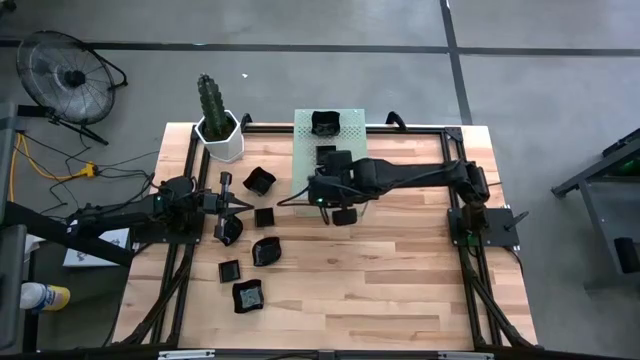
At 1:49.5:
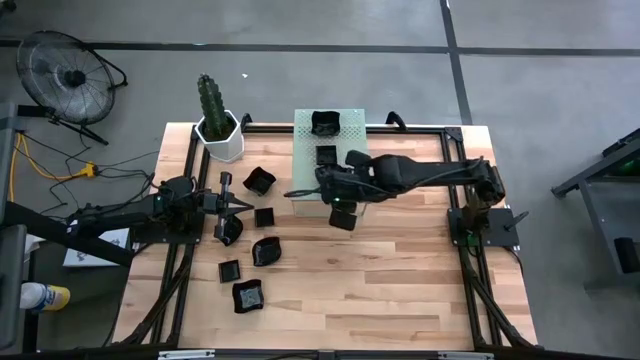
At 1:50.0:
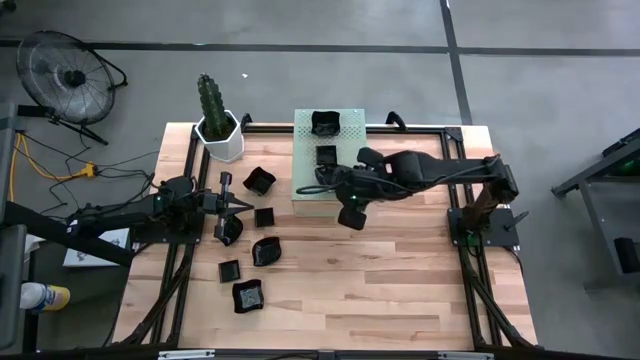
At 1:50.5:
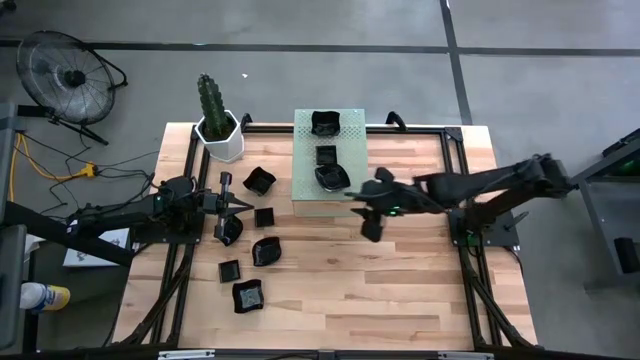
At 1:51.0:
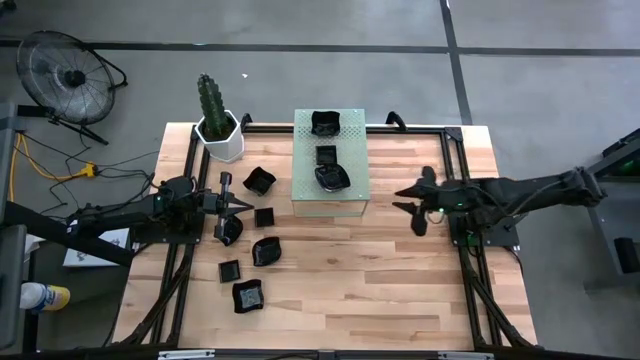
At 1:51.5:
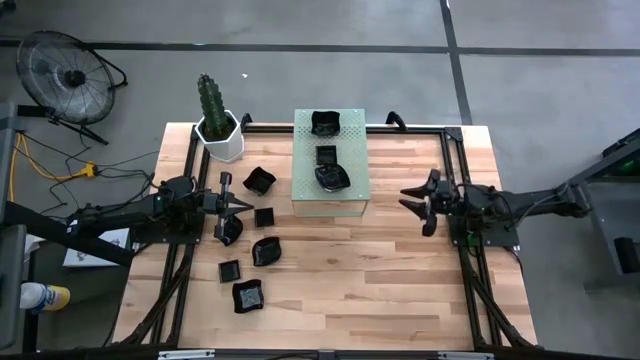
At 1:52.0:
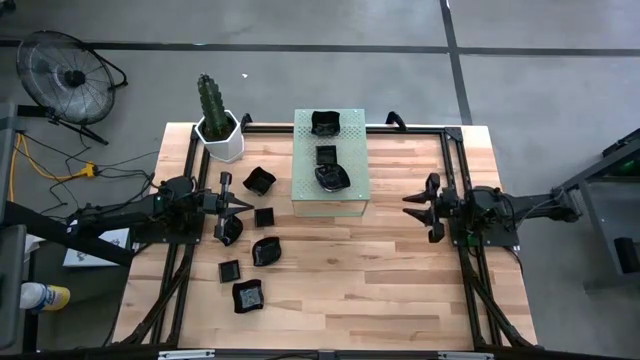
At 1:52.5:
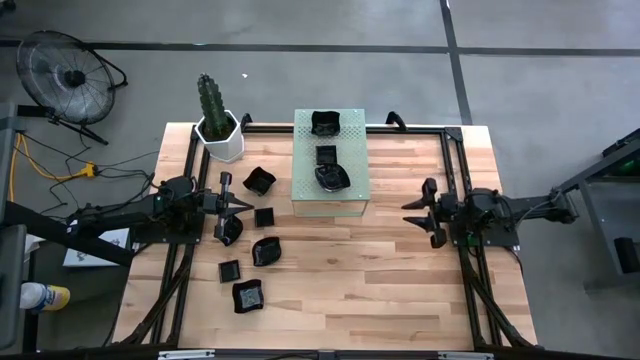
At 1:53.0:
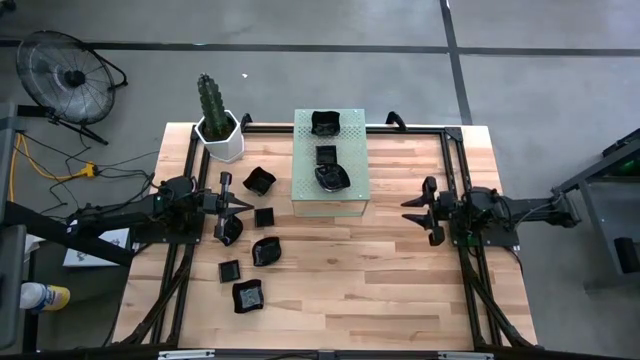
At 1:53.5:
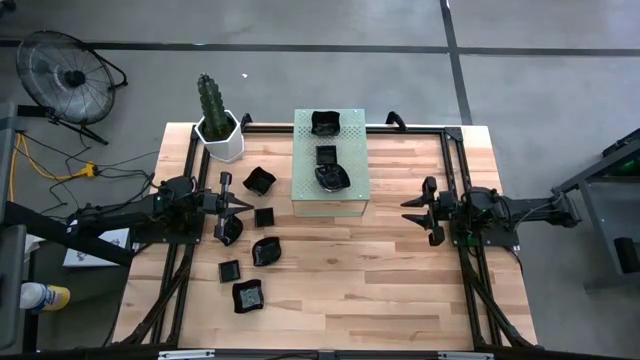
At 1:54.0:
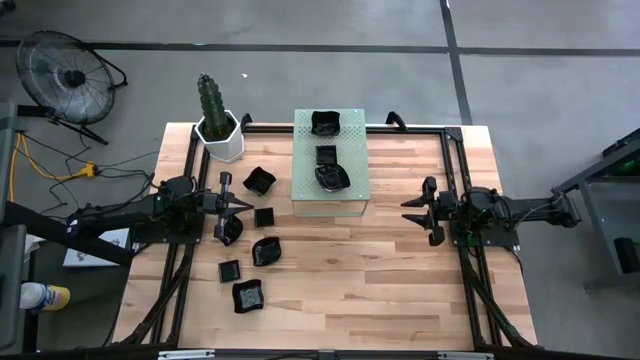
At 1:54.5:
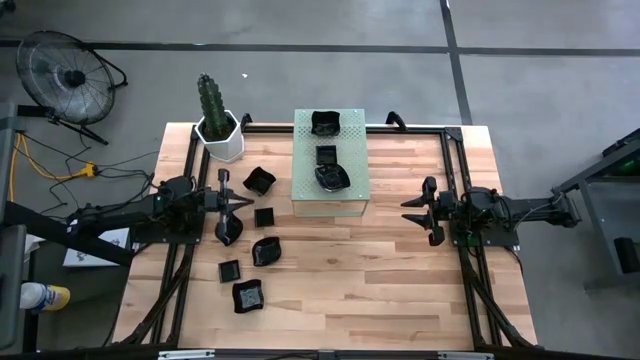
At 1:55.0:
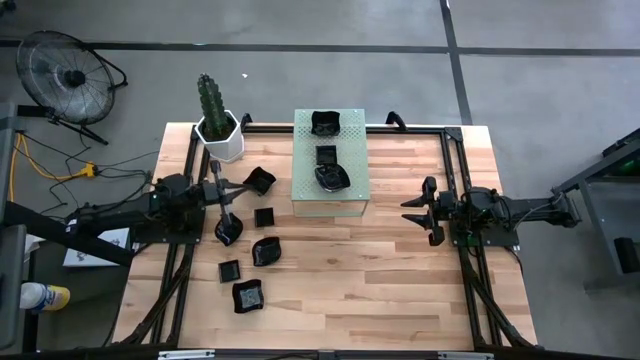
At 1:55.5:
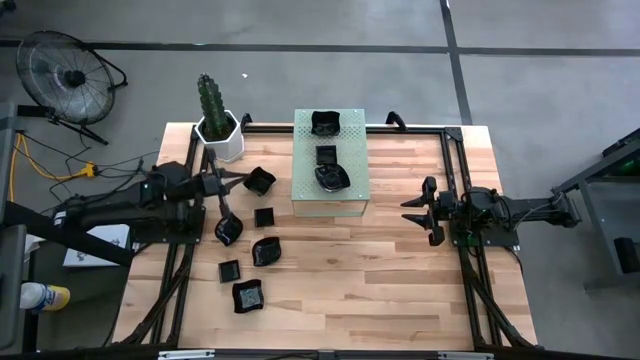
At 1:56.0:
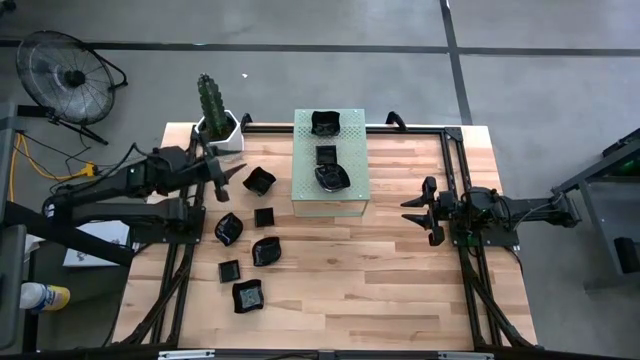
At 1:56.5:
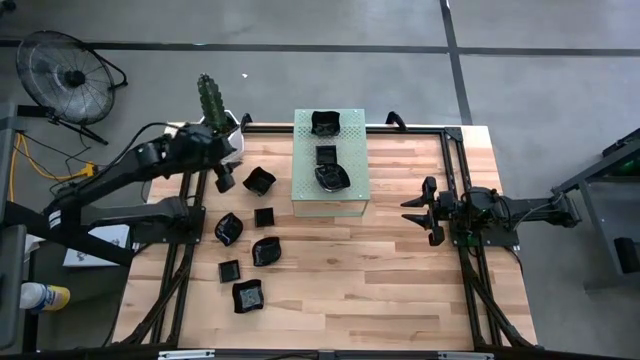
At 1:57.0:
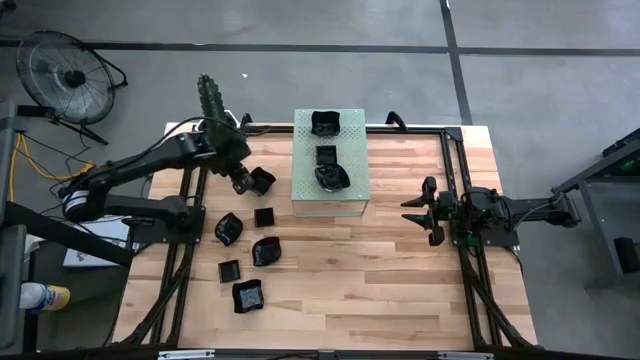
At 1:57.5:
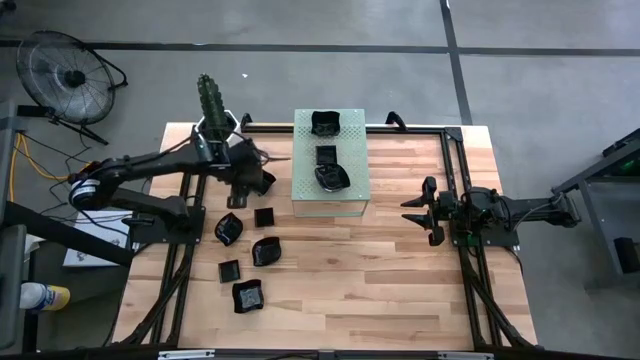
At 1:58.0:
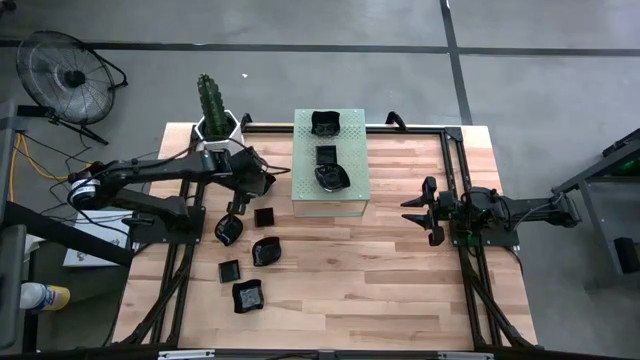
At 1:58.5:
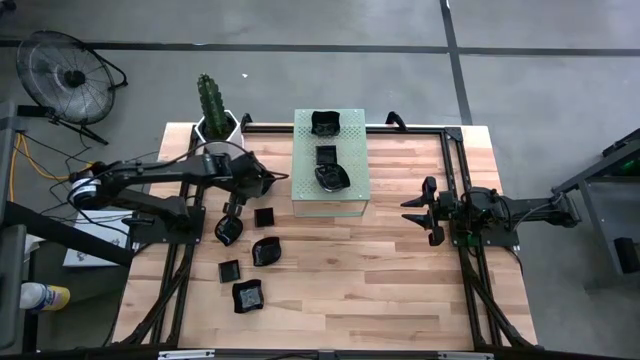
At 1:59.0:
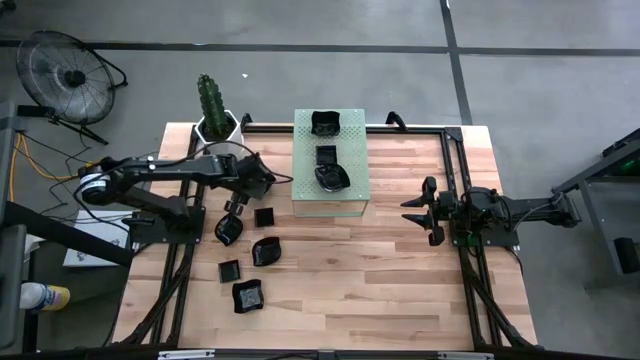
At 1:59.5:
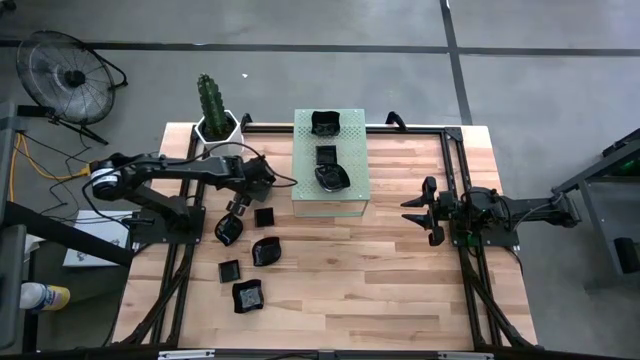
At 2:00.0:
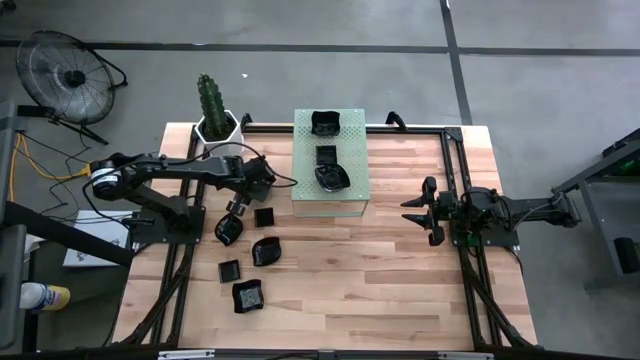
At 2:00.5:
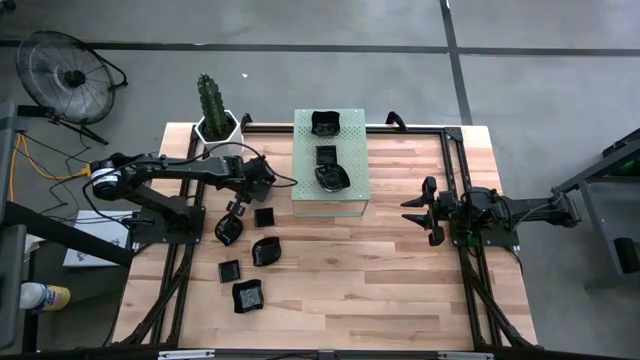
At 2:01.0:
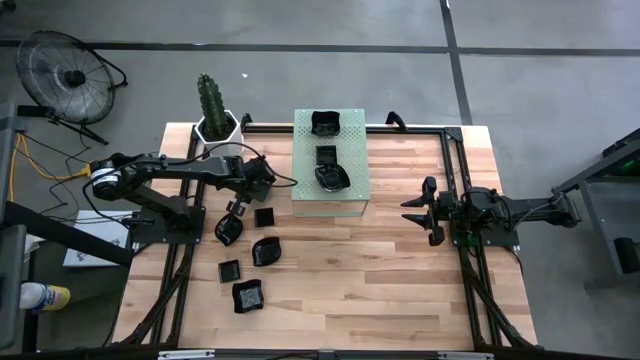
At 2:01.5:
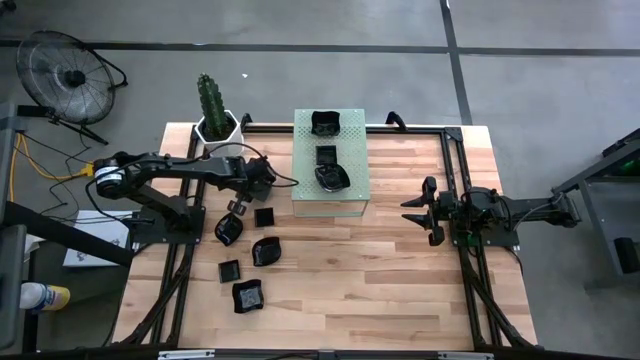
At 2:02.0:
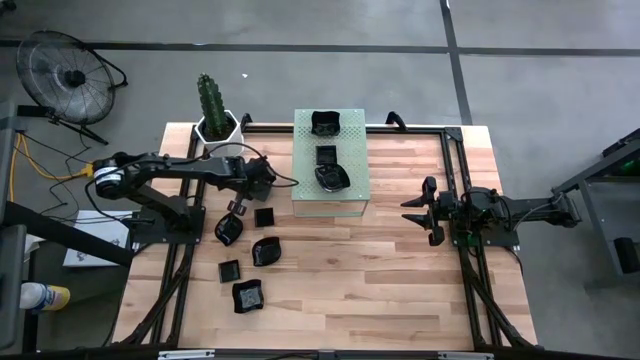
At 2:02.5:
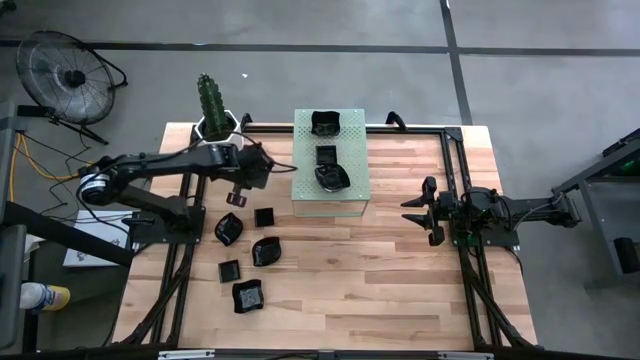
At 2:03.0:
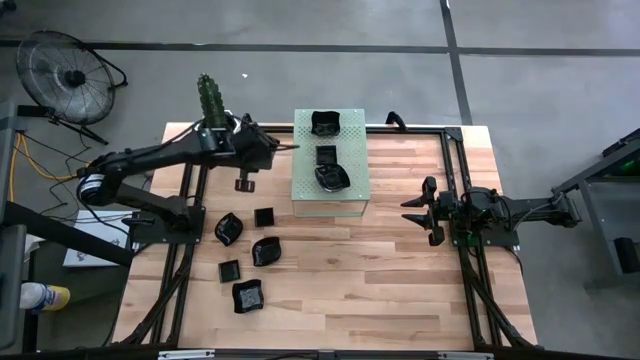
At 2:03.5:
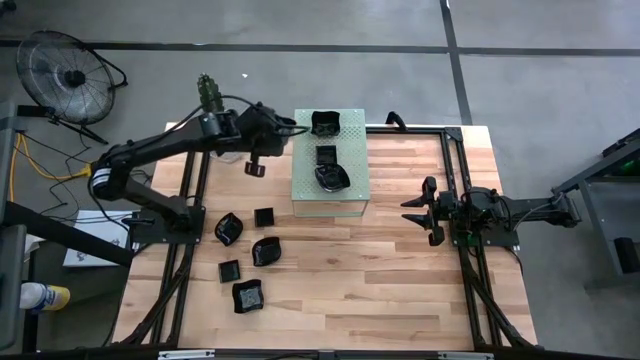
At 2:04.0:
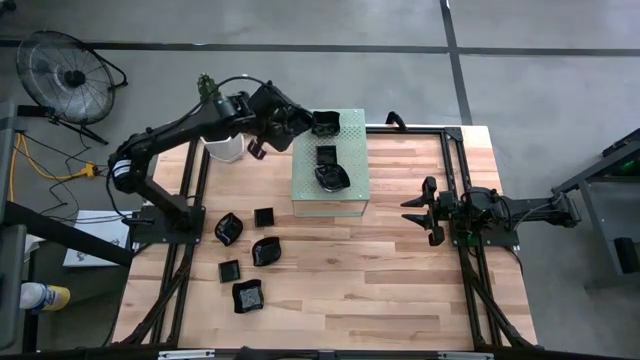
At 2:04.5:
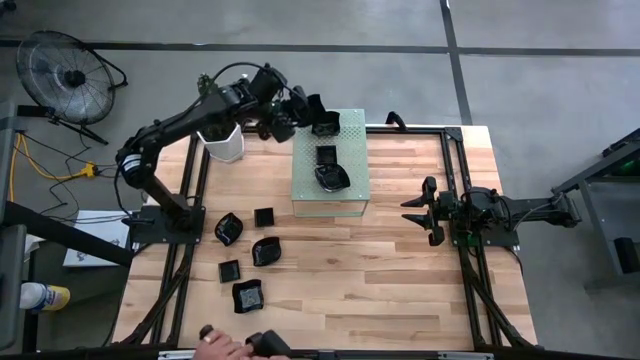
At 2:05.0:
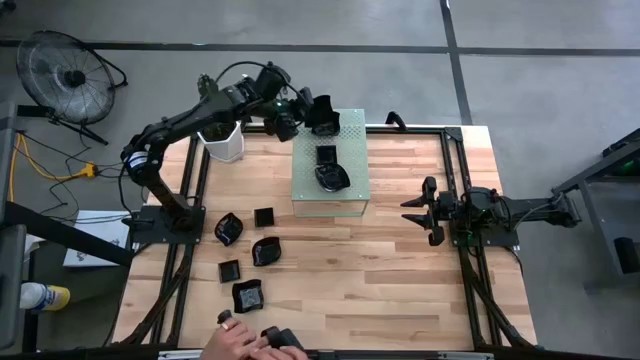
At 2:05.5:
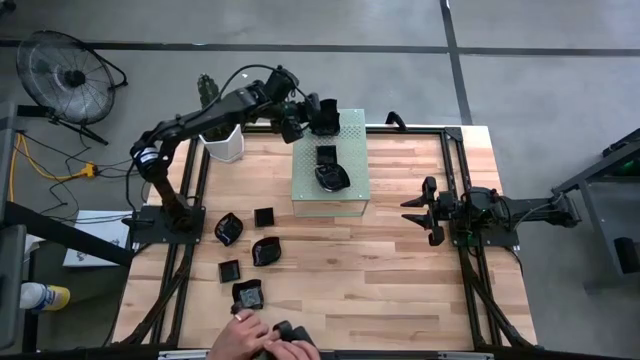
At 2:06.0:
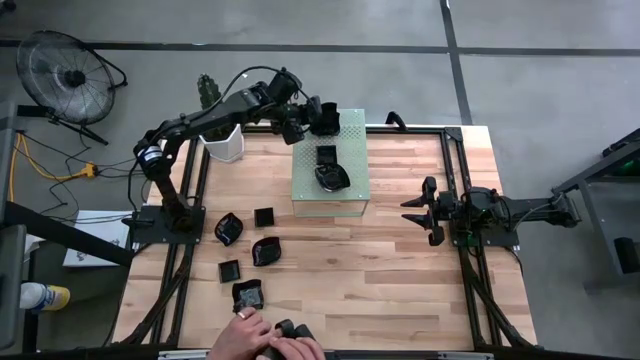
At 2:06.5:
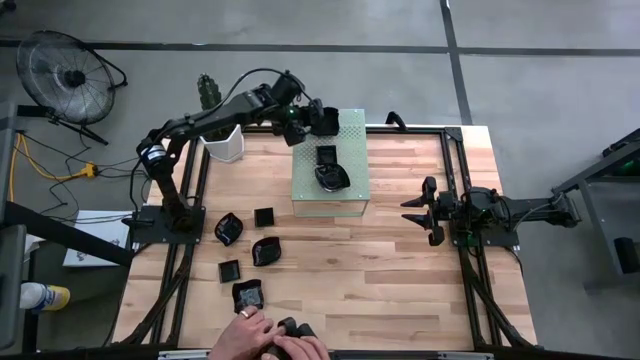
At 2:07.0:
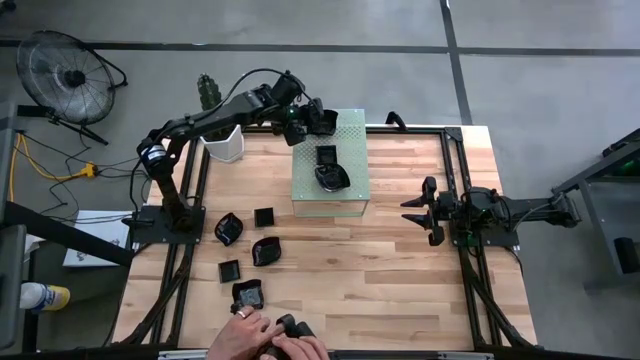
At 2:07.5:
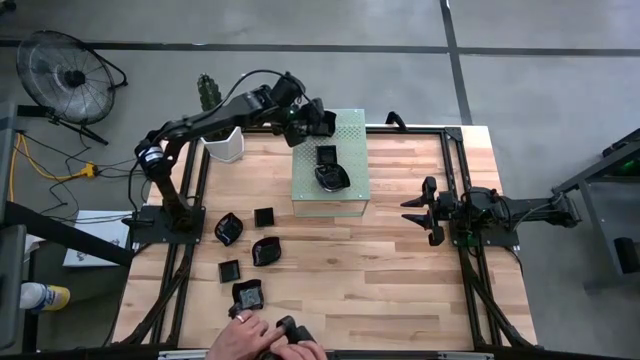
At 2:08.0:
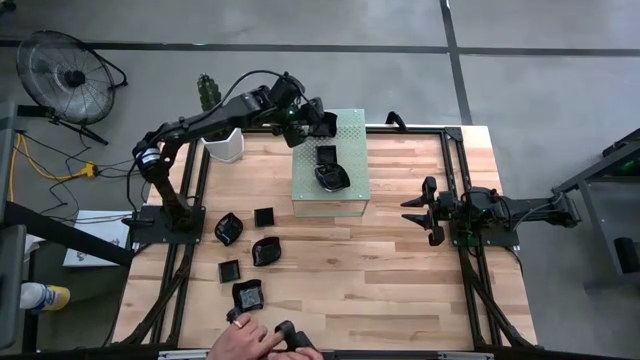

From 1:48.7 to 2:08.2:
Task: Pick & Place Mini shaped plates
Stack the black distorted square plate on top of the black distorted square plate on the shelf
